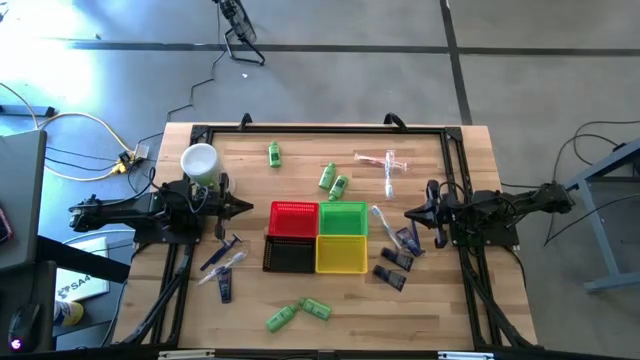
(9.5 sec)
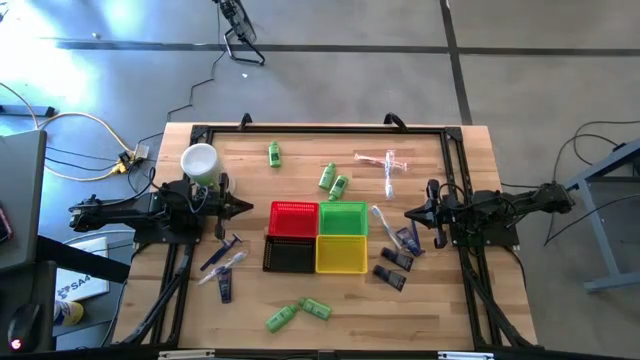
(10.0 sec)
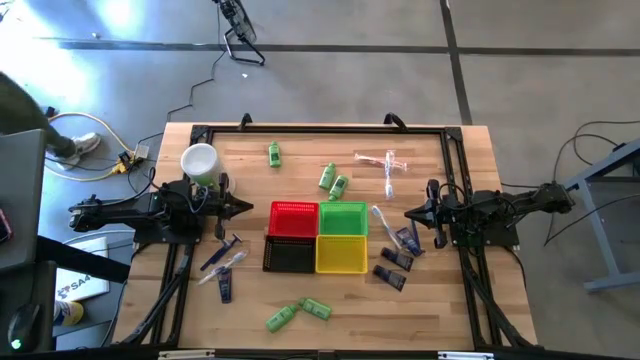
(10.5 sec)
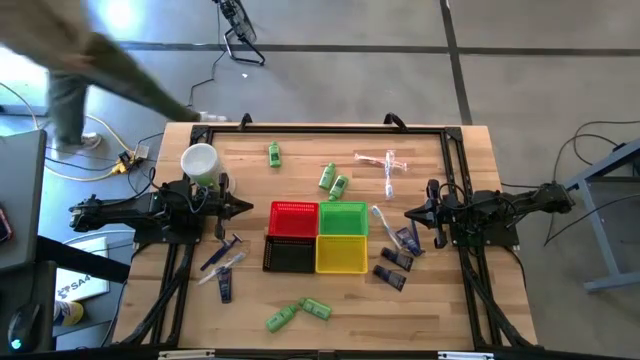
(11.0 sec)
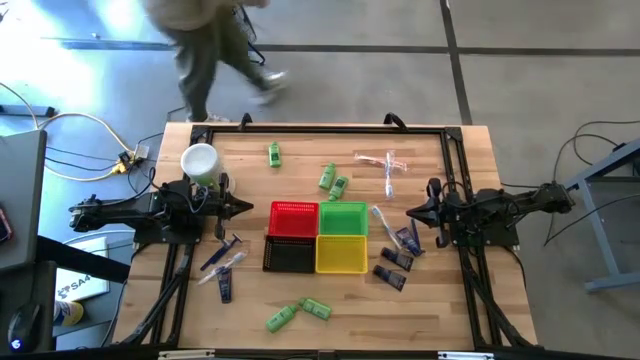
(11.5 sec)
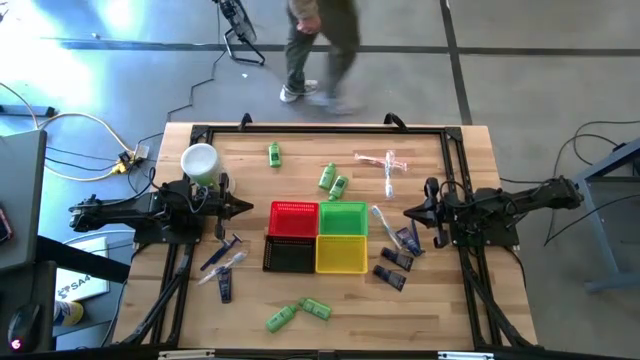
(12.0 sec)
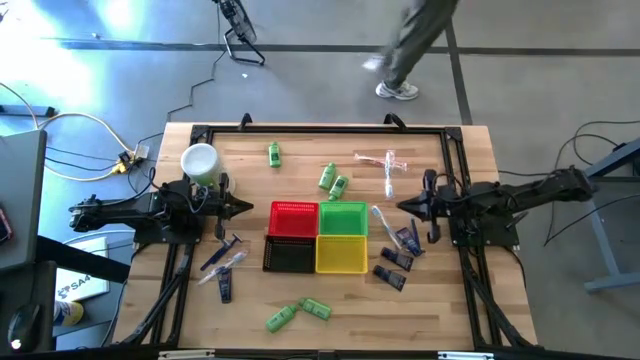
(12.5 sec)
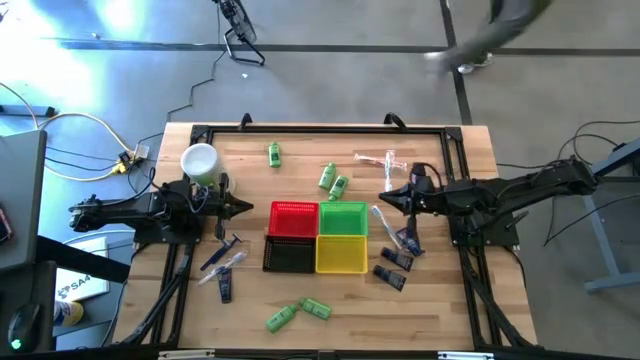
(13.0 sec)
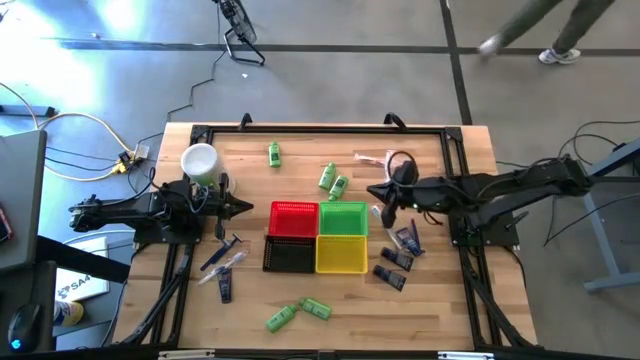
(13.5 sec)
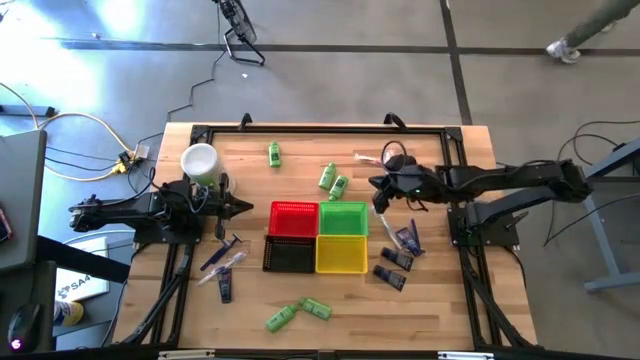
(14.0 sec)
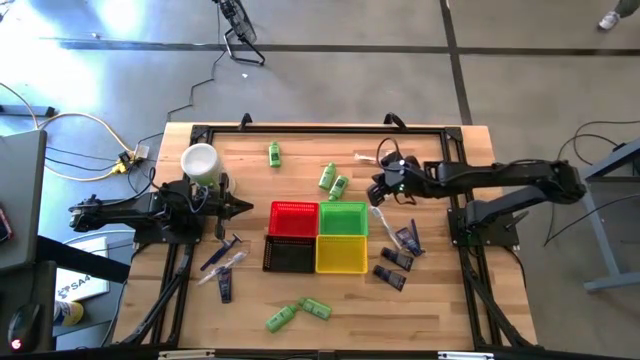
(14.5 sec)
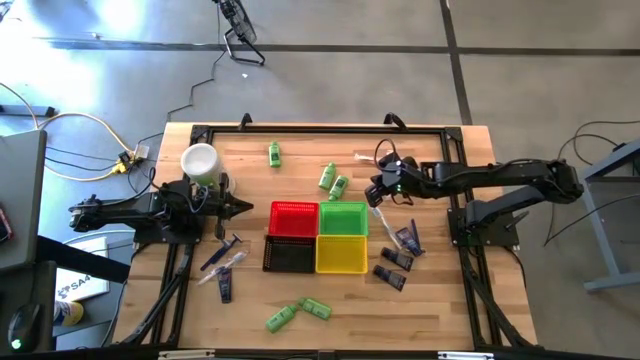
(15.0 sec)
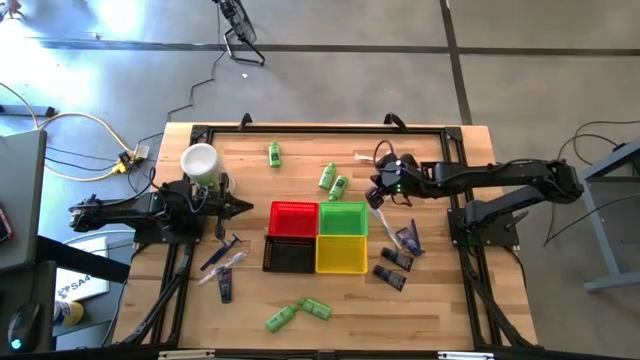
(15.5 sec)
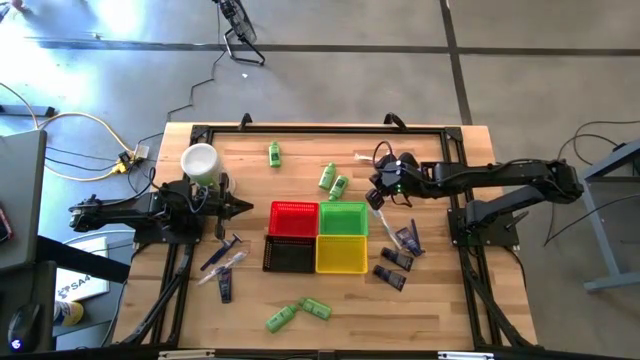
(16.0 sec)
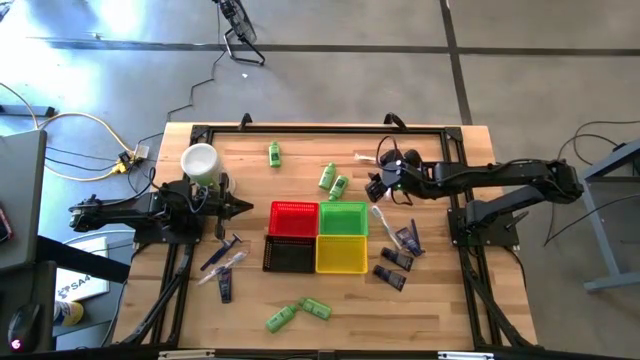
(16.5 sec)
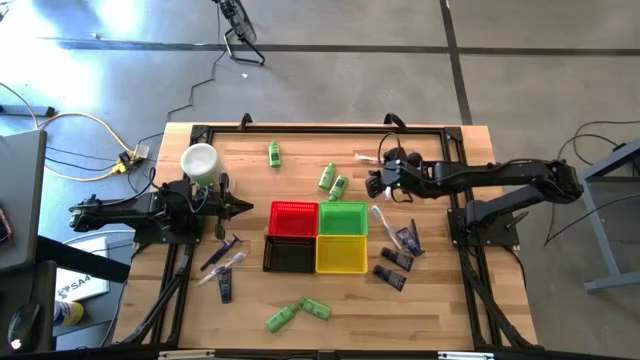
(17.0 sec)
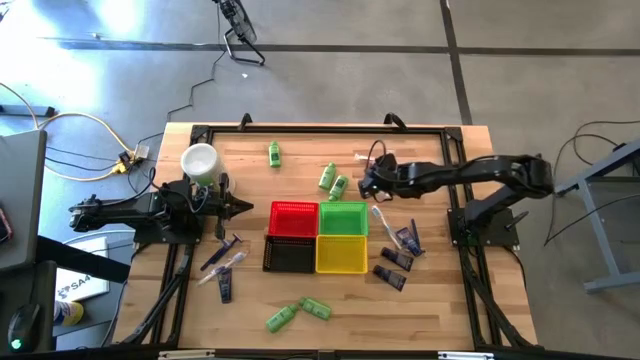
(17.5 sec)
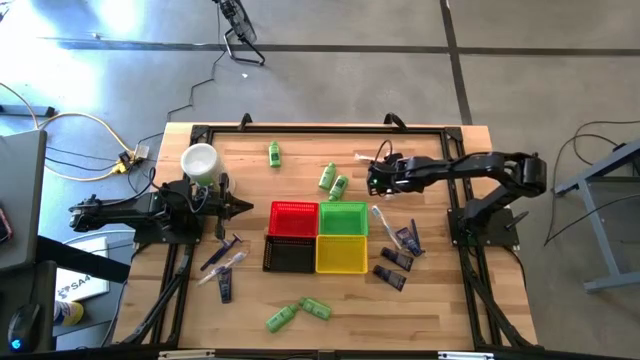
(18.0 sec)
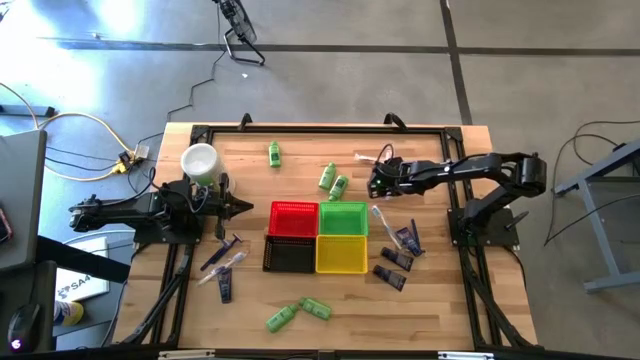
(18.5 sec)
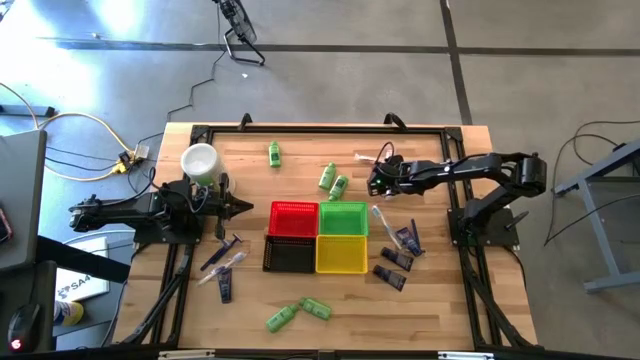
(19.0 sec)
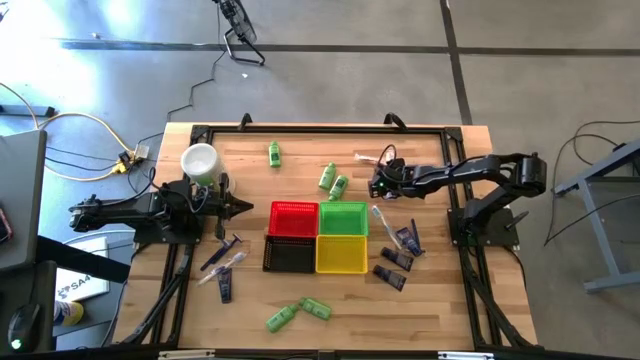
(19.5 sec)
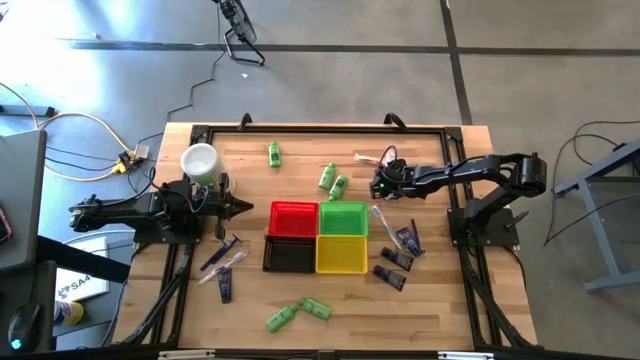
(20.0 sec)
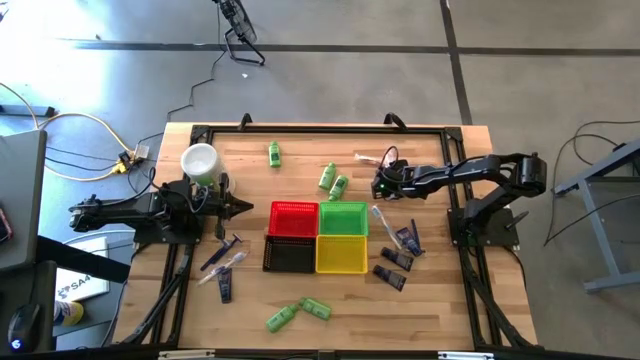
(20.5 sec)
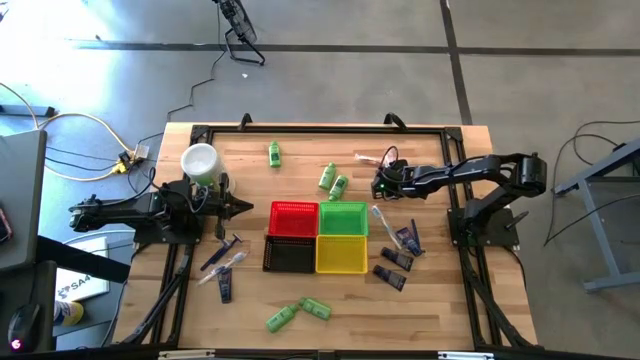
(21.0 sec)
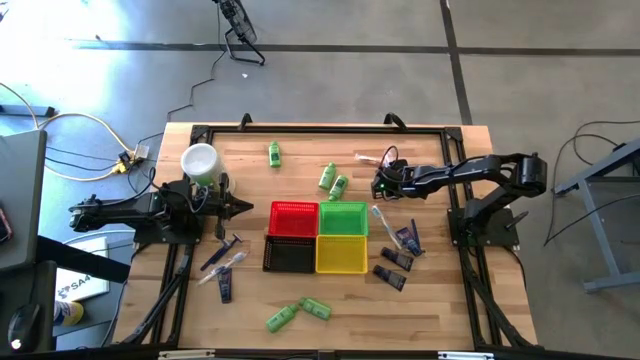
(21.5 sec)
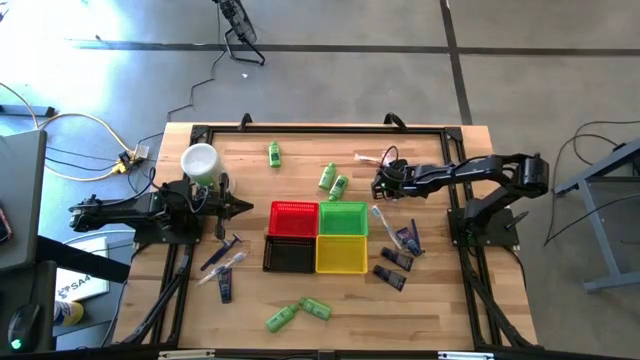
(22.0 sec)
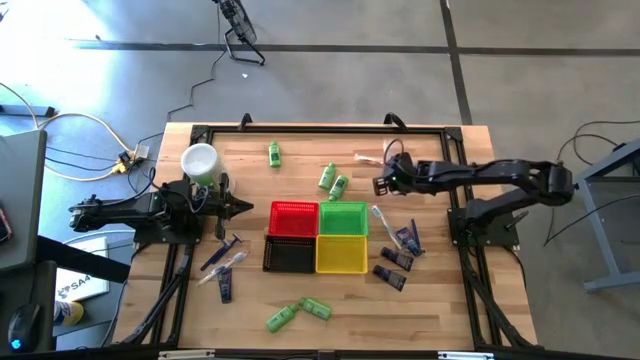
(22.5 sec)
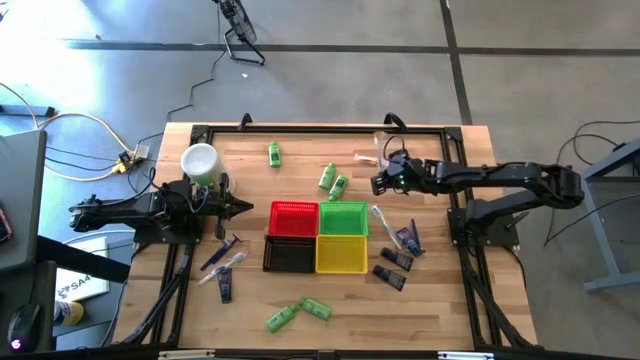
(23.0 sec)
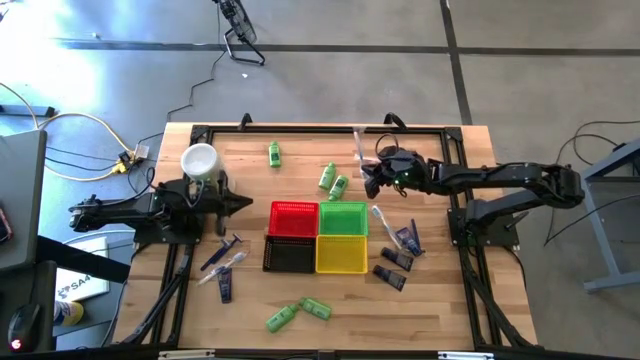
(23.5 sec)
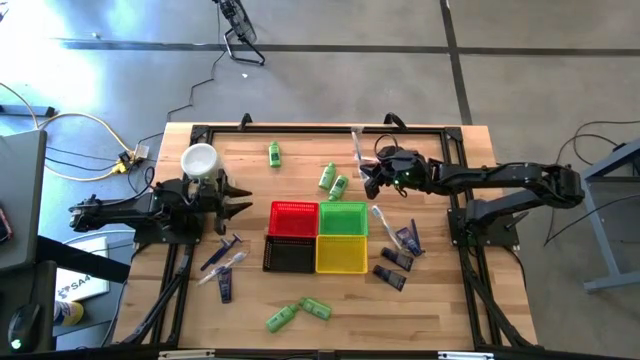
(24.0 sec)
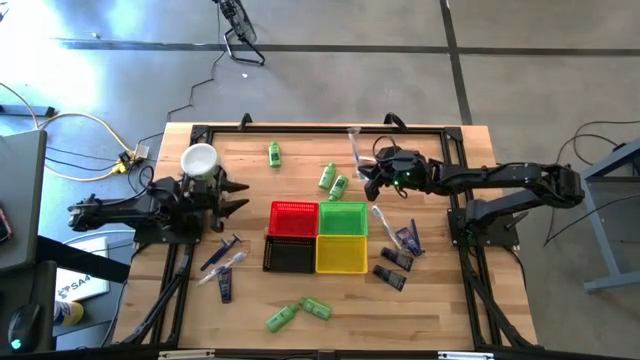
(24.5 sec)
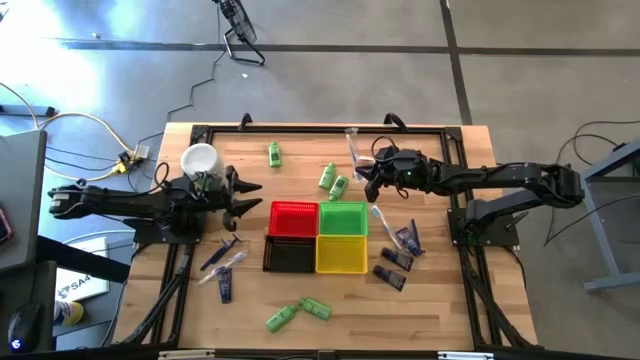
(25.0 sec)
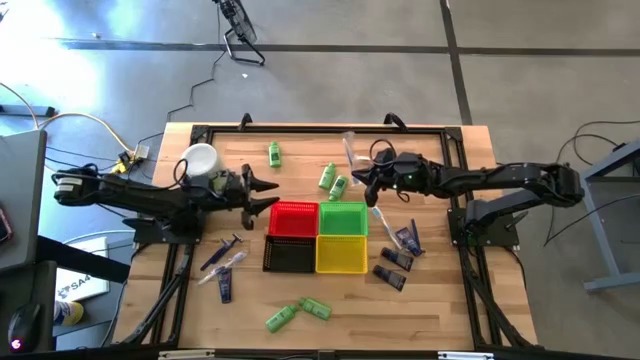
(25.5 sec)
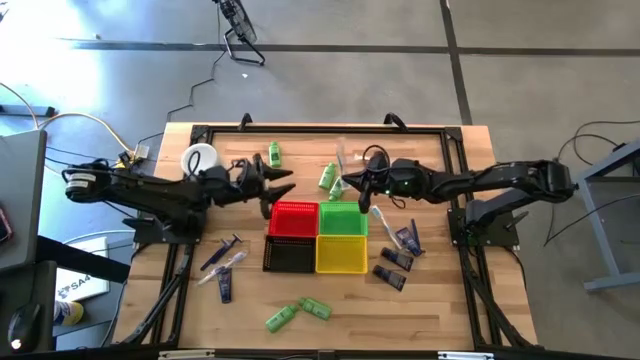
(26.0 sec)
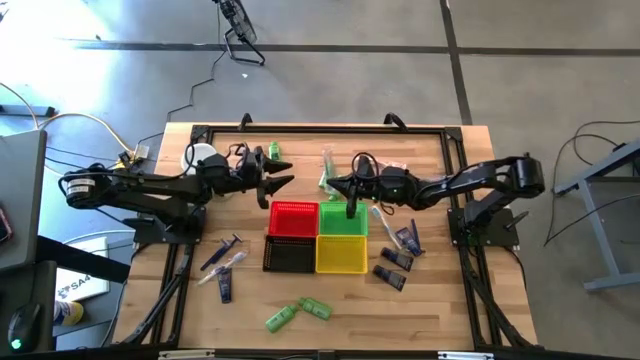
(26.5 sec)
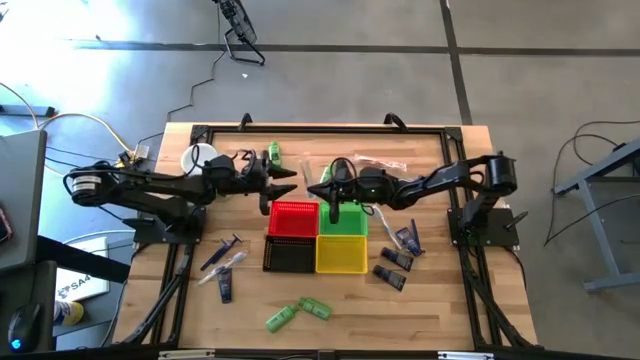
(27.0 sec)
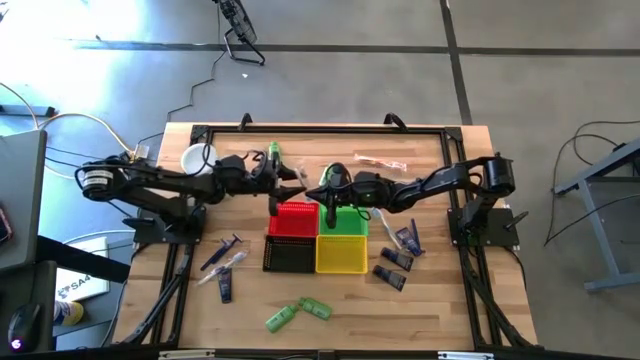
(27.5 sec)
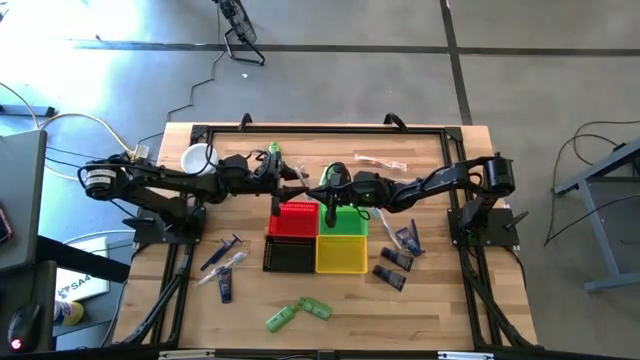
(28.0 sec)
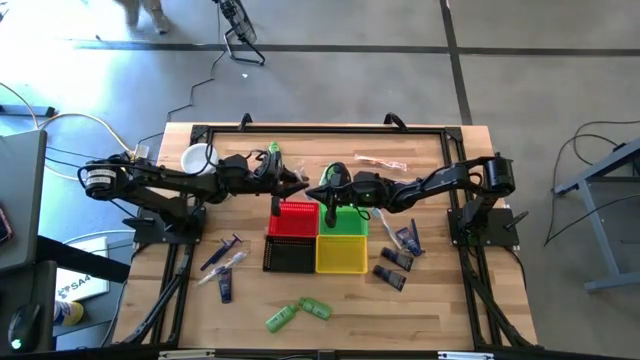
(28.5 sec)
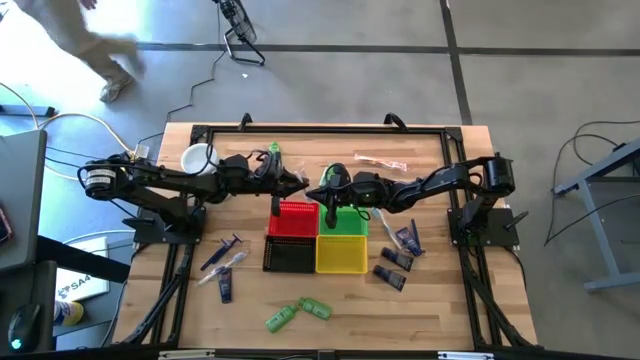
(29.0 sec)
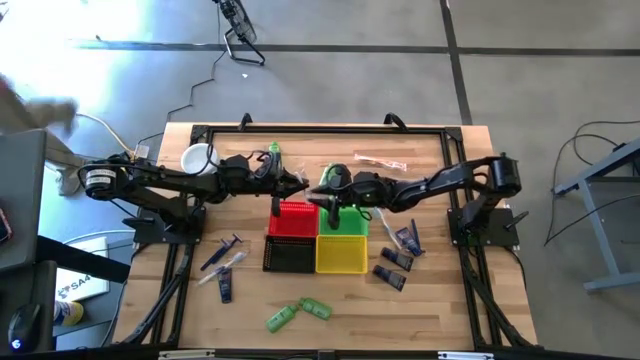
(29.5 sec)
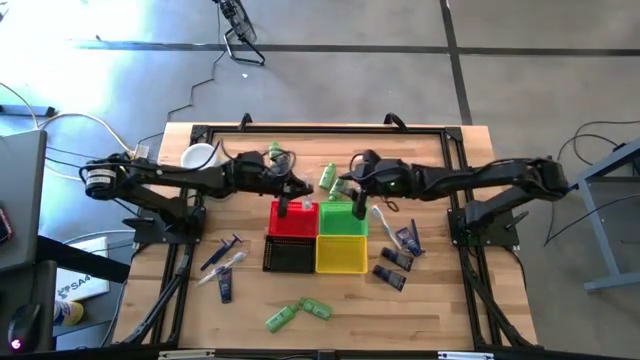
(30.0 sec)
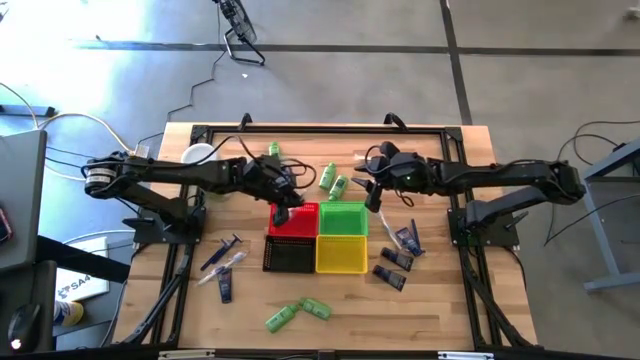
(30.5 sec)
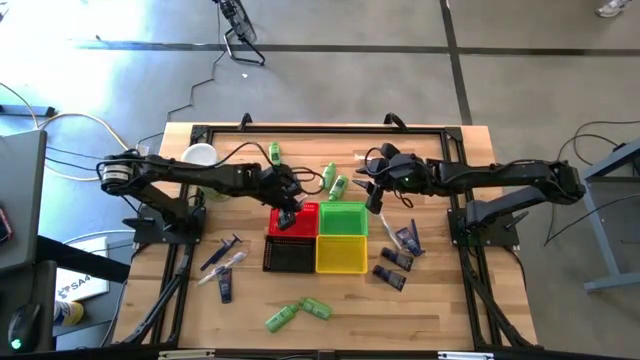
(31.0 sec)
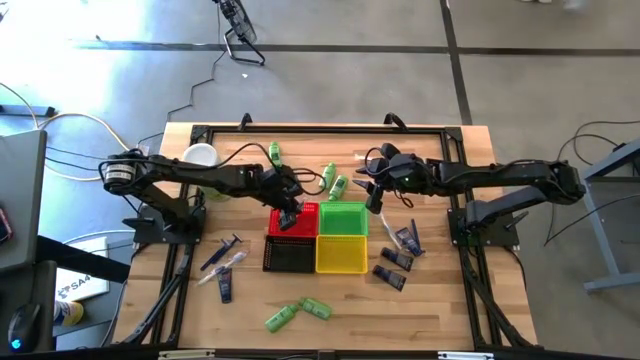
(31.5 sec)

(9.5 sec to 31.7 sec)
Task: Pick & Place Travel size toiletries
Put the blue toothbrush into the red bin
